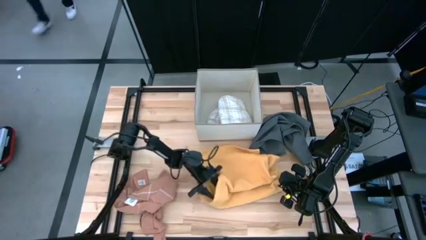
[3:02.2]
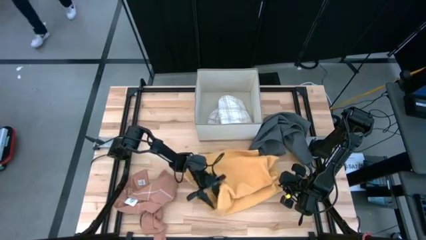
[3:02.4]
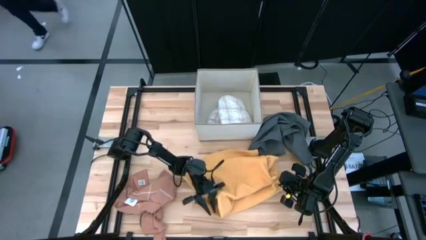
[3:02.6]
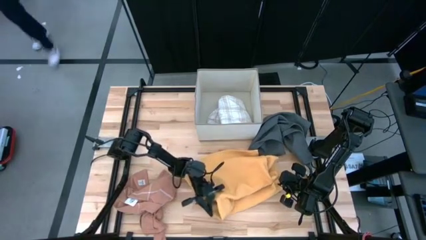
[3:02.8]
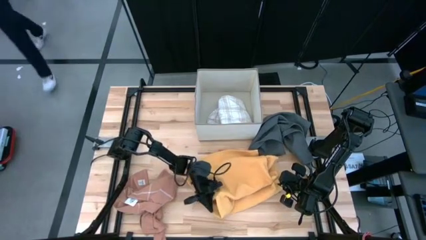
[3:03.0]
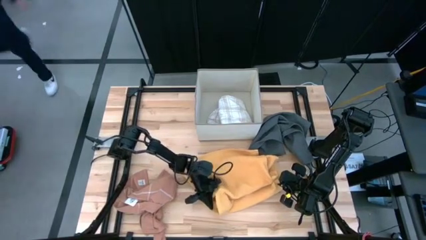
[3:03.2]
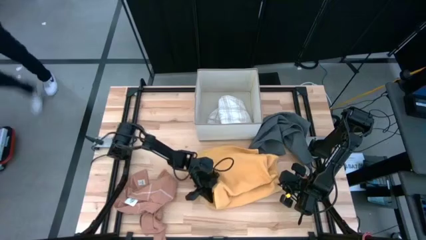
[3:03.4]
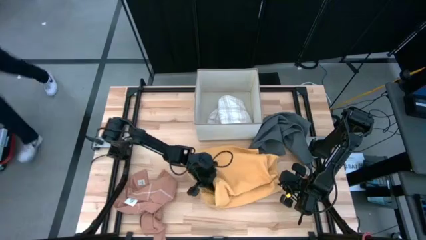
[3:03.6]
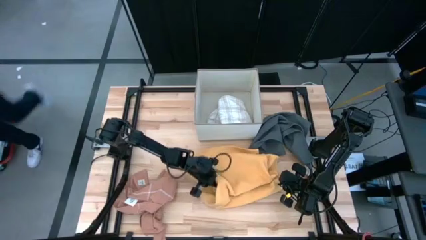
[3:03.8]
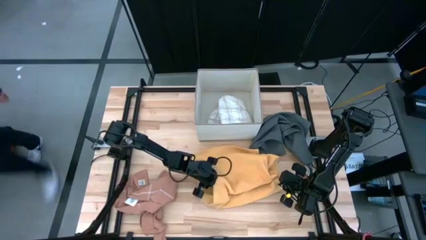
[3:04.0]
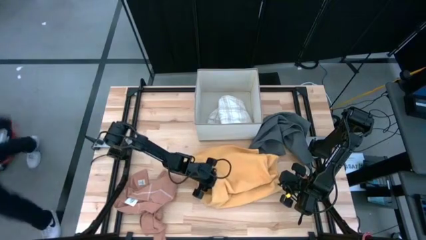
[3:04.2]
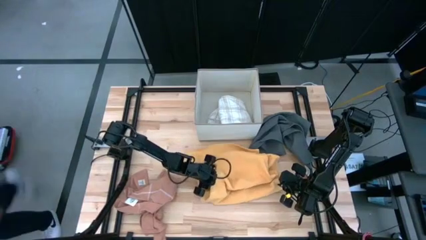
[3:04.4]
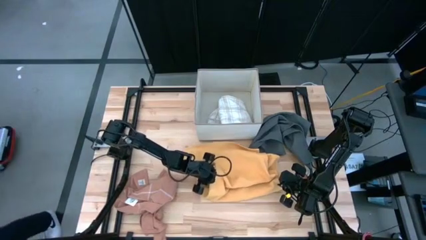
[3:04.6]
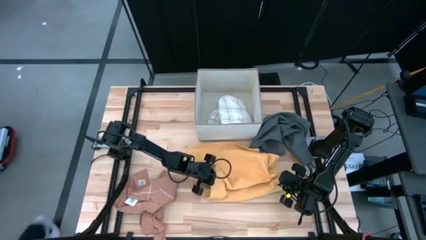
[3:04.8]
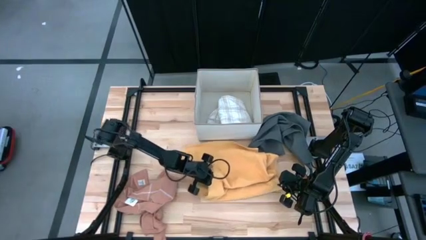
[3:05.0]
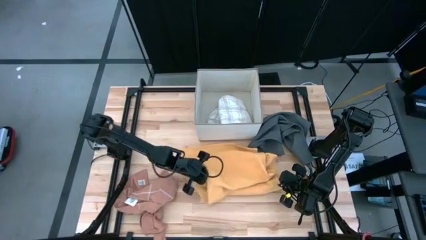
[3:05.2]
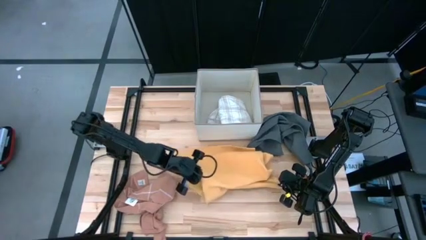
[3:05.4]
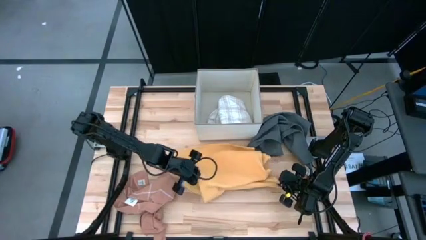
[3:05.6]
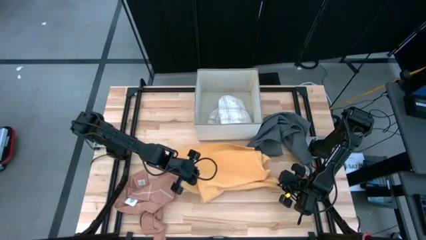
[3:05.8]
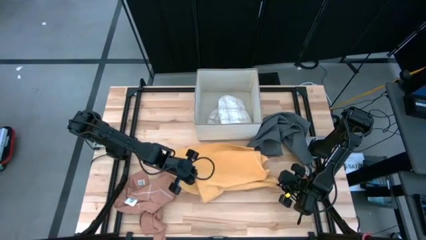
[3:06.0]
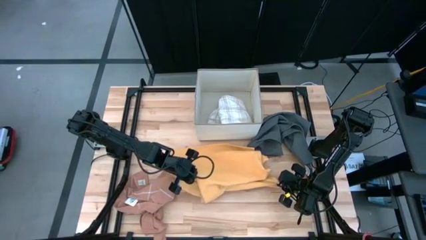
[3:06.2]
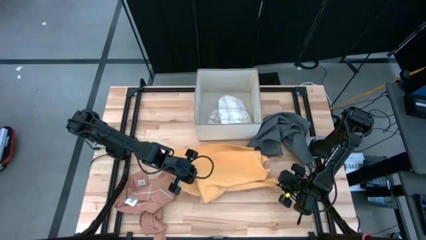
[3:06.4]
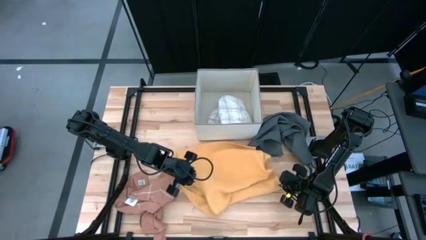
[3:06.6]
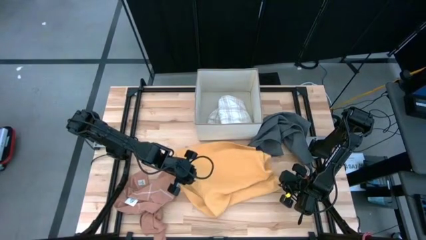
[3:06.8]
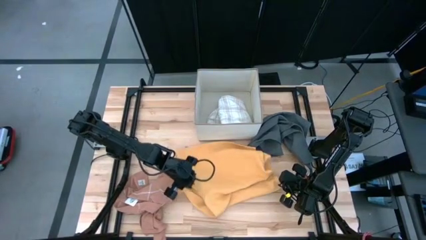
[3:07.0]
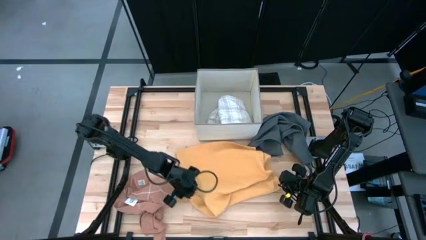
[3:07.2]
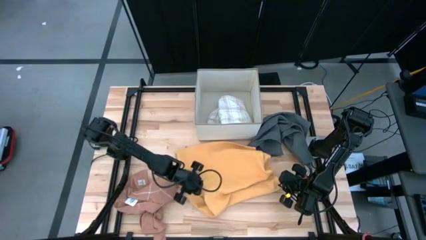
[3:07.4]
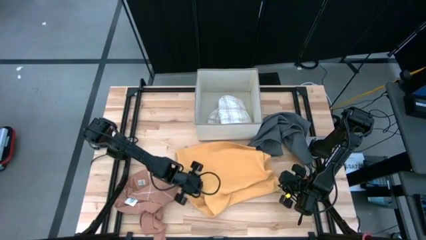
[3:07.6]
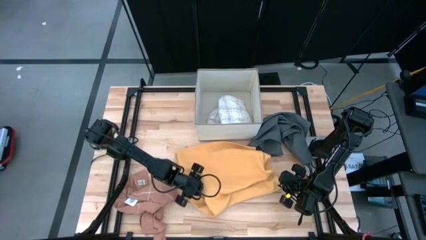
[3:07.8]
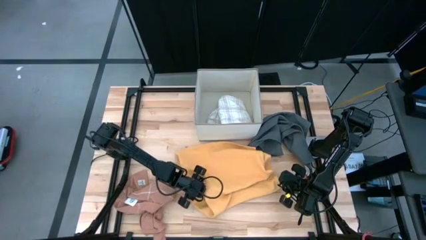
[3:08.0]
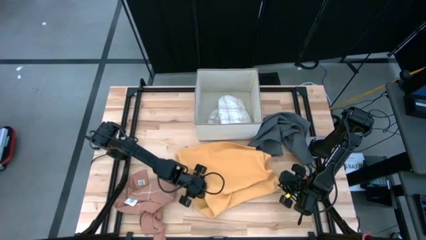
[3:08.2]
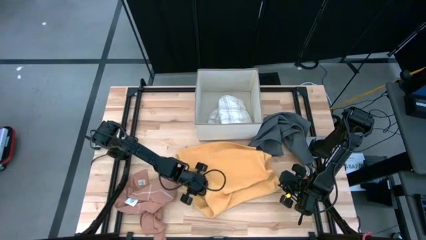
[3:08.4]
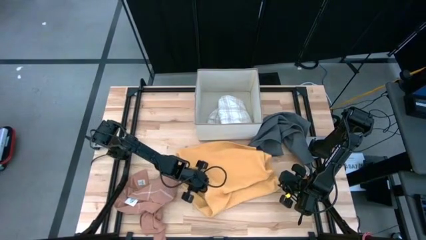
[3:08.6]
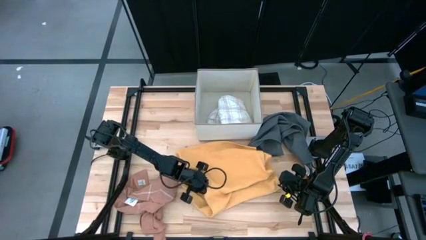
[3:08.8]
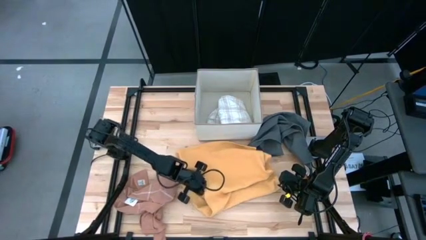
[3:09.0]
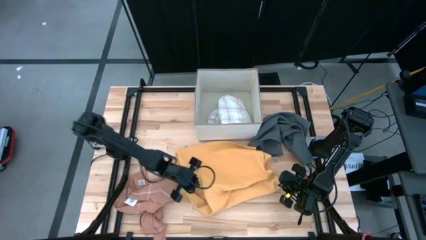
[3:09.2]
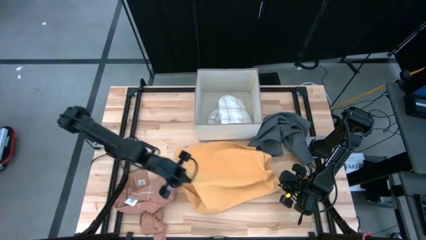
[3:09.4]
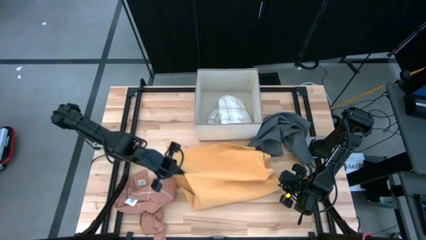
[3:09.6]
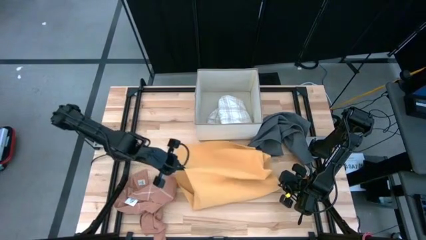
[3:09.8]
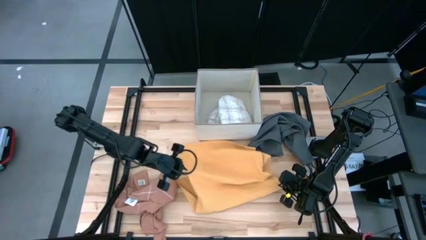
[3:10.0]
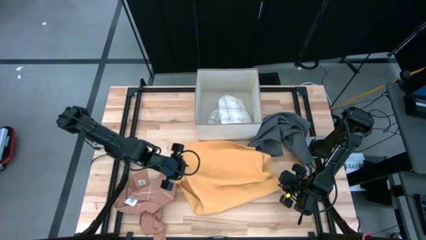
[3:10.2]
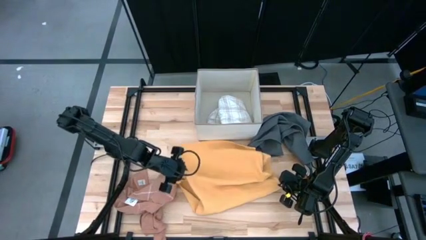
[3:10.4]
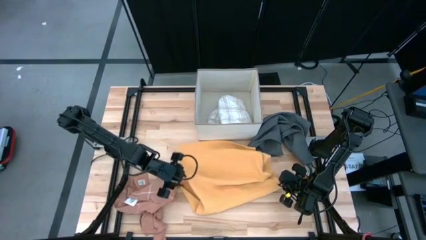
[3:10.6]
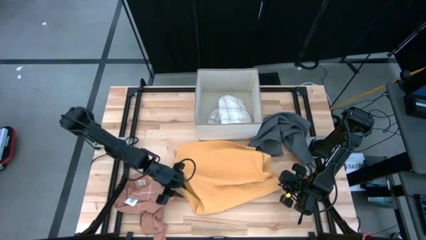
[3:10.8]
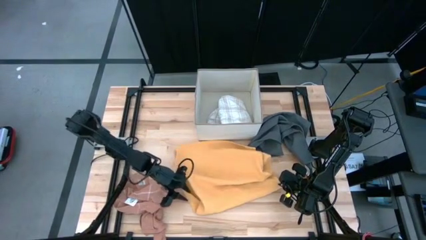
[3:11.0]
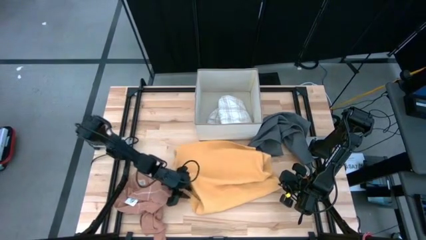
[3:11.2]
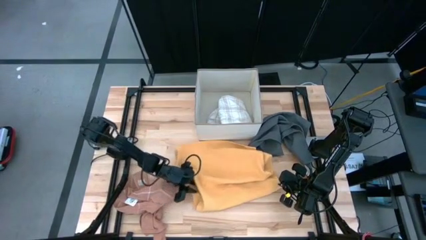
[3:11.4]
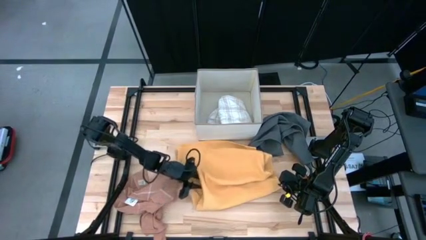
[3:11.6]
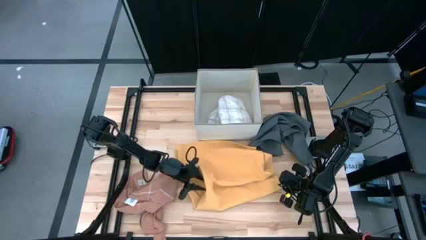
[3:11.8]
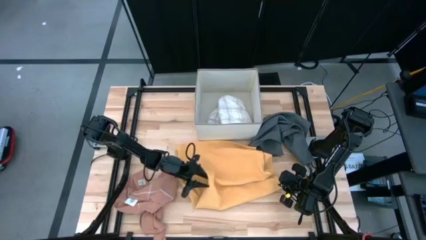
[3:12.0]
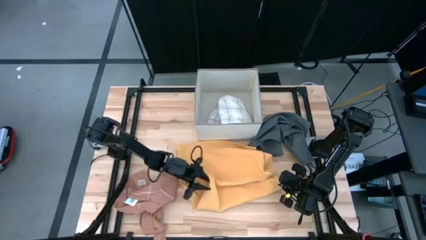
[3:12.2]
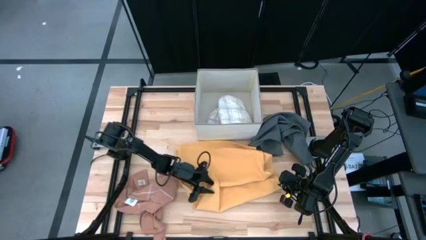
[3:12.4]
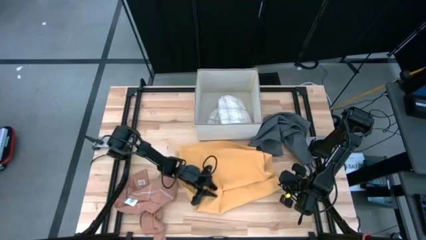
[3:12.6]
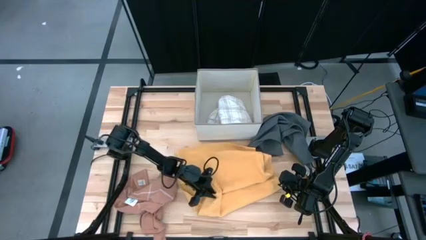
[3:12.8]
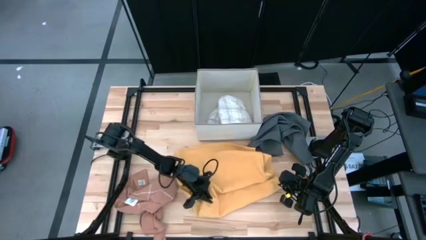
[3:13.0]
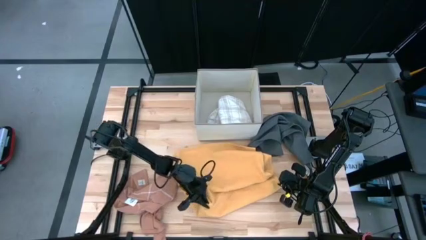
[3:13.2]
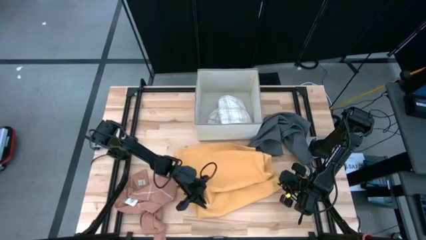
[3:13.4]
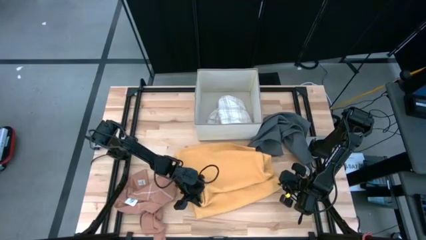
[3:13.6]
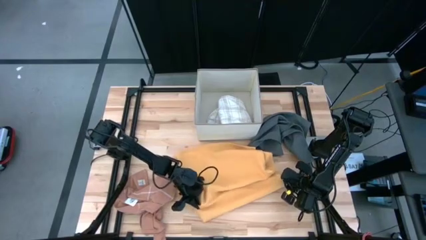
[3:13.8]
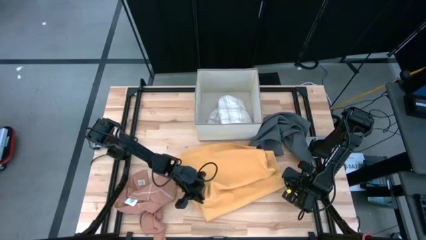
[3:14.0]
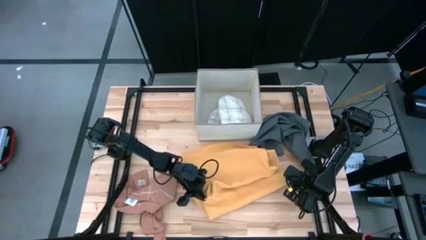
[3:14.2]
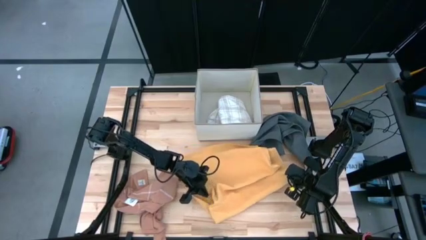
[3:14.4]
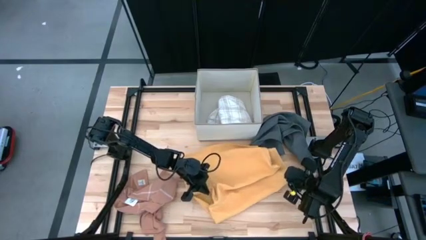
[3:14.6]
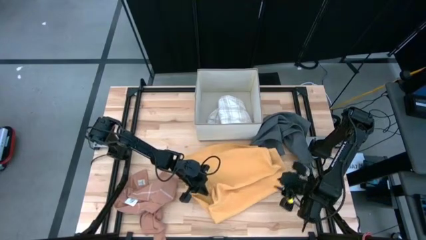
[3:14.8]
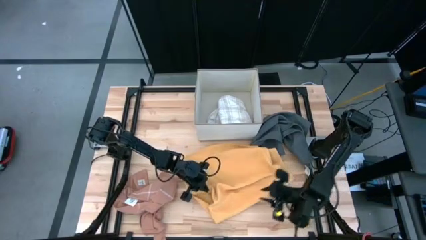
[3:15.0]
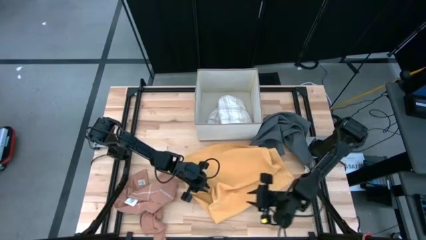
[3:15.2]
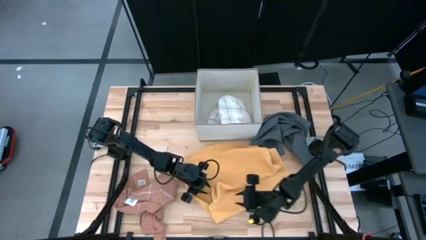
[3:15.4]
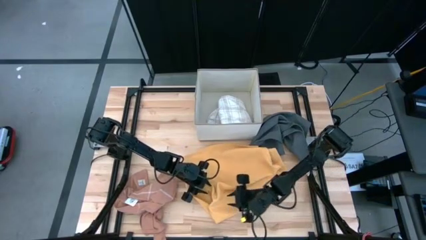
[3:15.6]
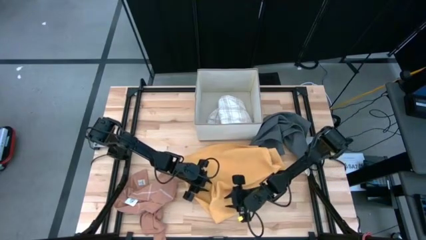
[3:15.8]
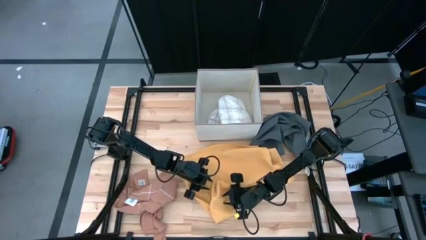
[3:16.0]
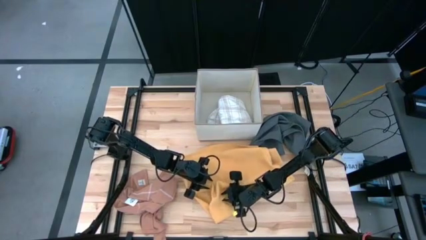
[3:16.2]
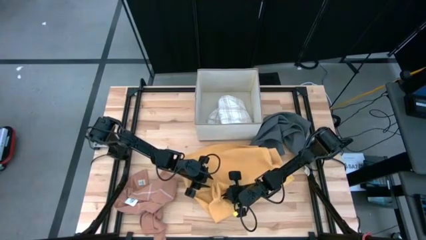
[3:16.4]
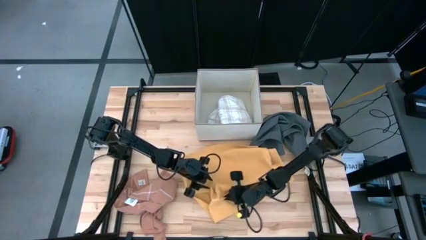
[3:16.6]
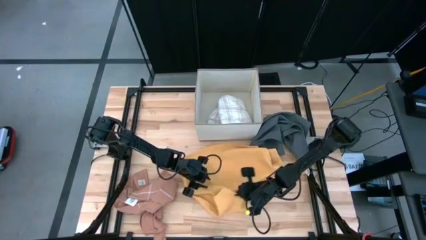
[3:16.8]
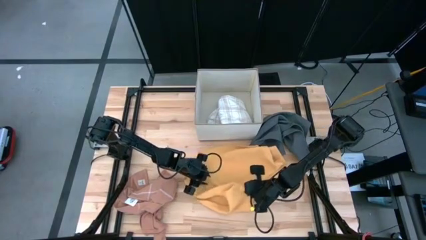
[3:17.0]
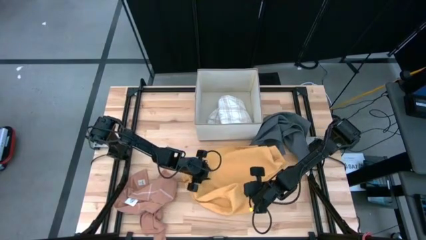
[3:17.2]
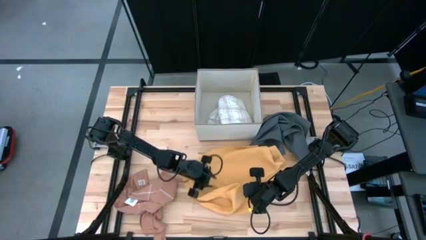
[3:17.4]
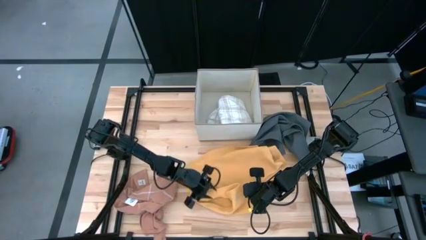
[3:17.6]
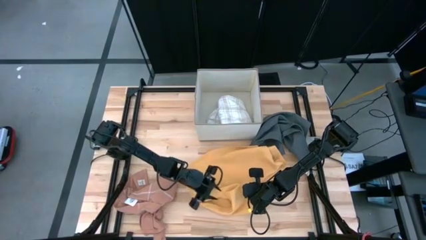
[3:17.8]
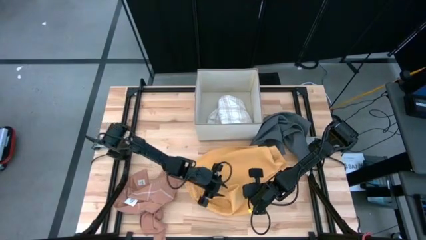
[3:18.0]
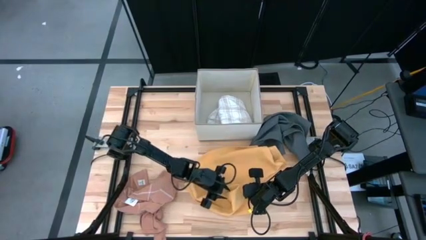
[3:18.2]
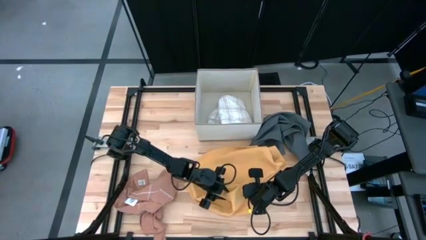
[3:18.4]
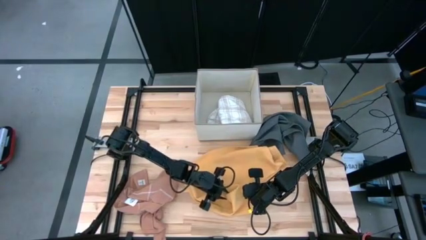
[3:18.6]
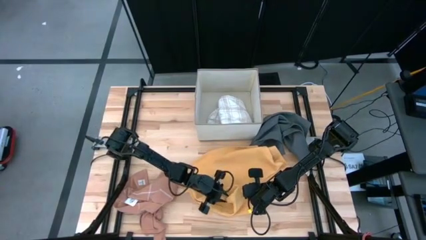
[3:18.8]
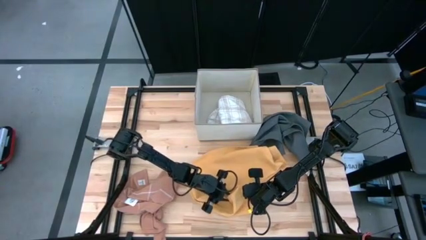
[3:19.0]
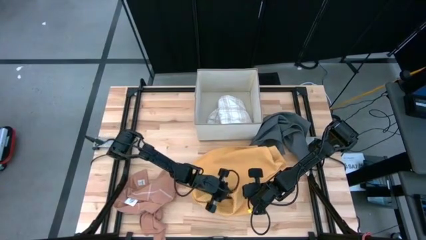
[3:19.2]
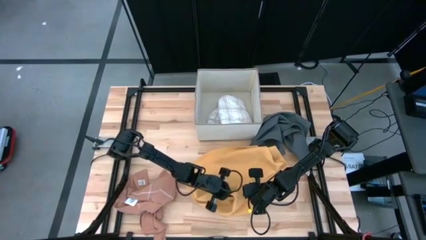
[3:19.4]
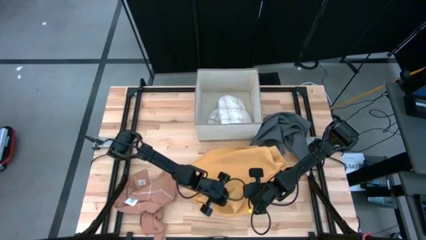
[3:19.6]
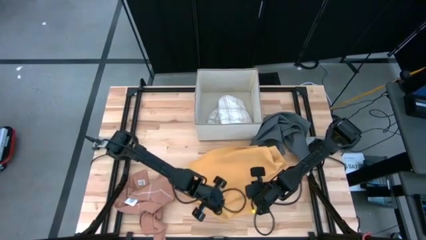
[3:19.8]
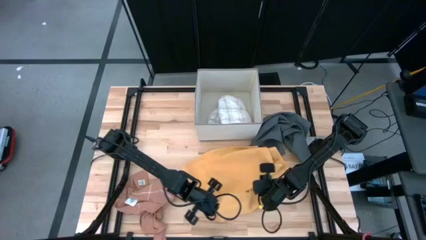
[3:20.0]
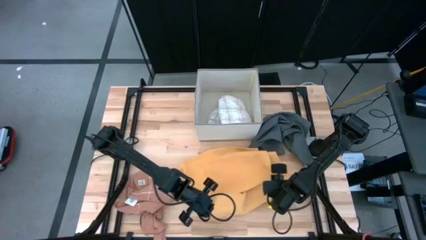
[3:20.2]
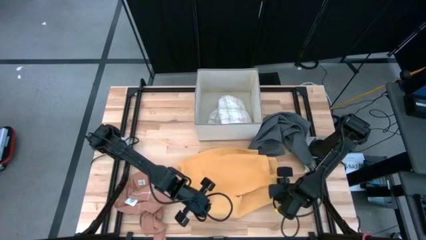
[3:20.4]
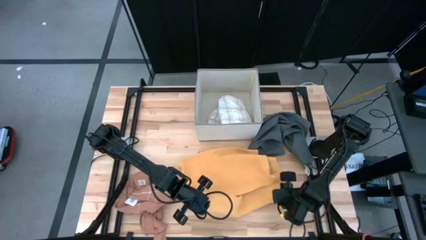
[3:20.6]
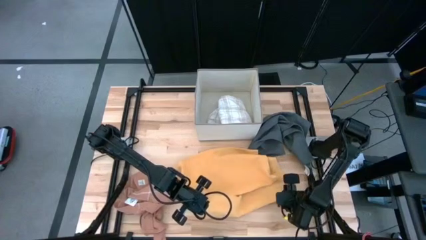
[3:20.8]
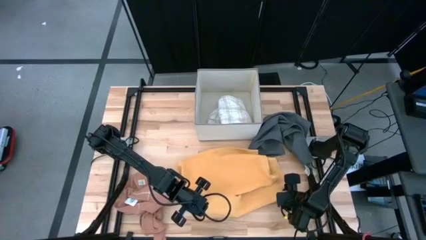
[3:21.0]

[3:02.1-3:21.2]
Task: Fold towel
Fold the yellow towel
